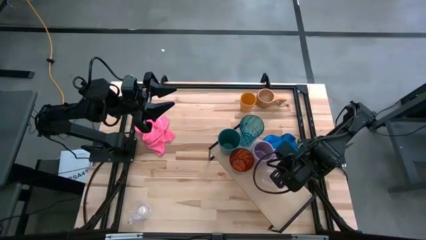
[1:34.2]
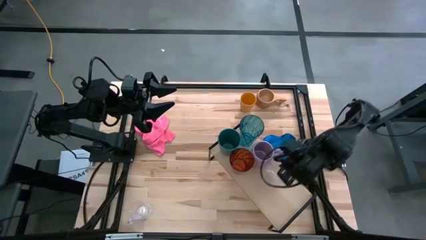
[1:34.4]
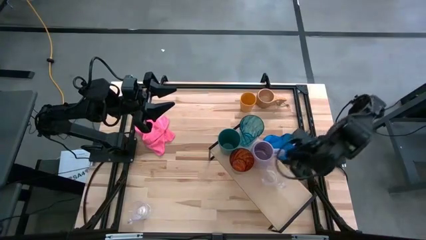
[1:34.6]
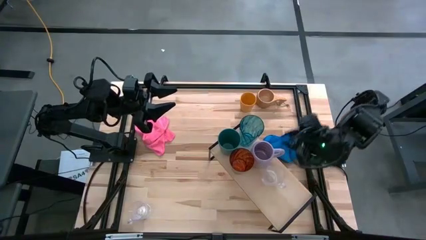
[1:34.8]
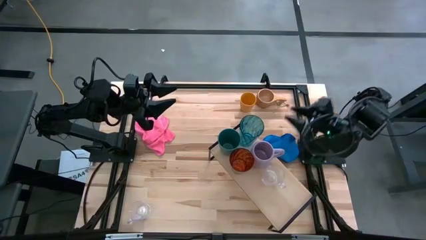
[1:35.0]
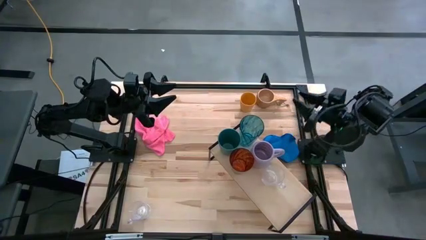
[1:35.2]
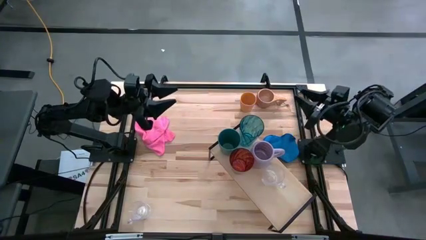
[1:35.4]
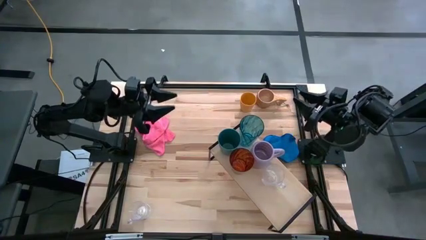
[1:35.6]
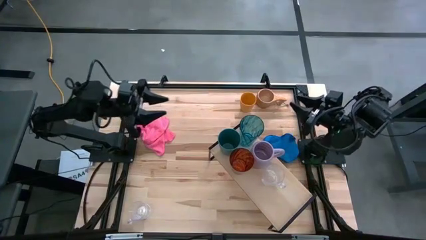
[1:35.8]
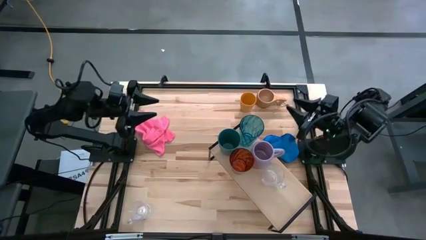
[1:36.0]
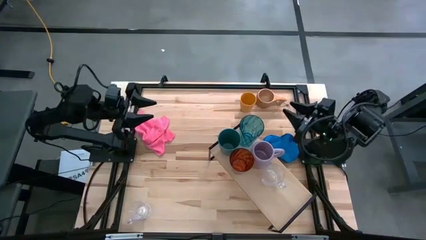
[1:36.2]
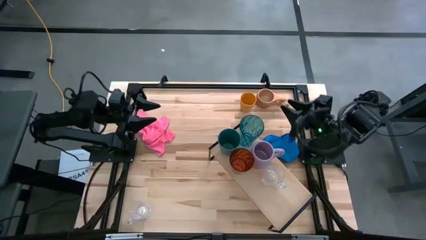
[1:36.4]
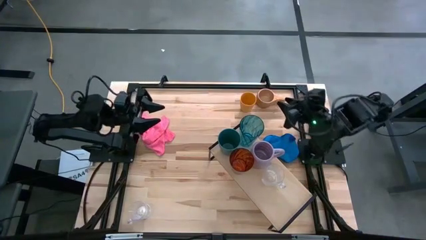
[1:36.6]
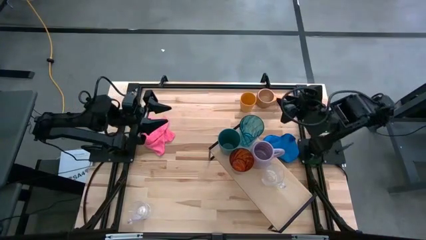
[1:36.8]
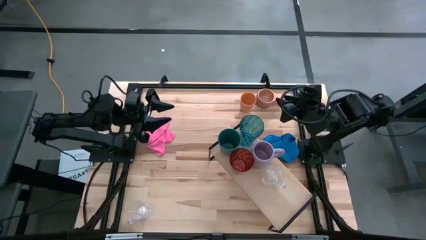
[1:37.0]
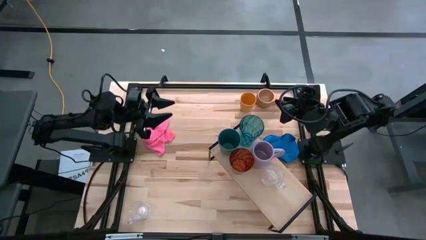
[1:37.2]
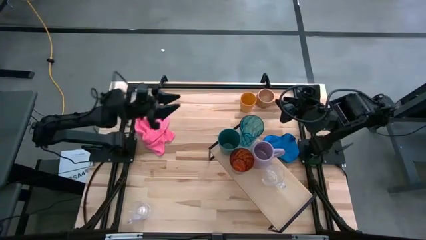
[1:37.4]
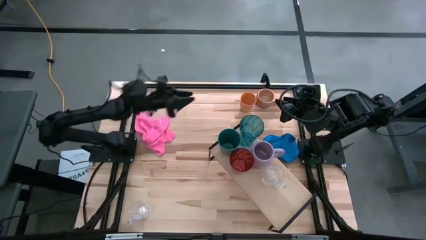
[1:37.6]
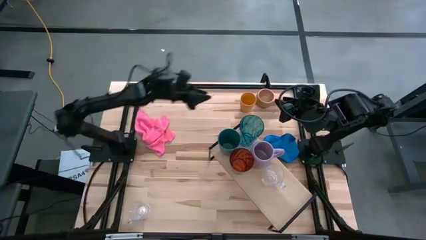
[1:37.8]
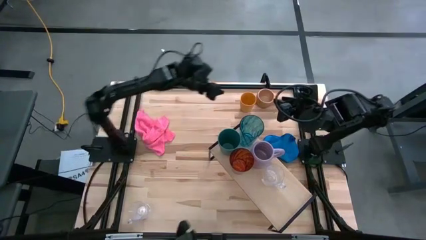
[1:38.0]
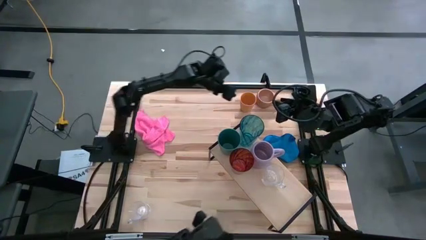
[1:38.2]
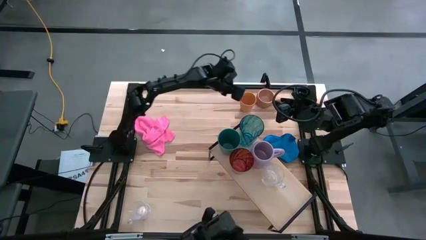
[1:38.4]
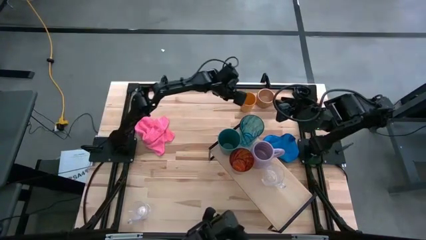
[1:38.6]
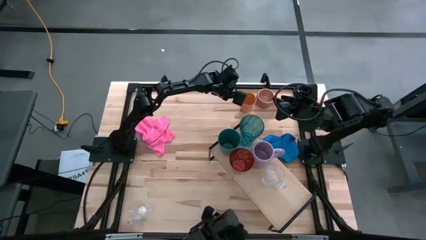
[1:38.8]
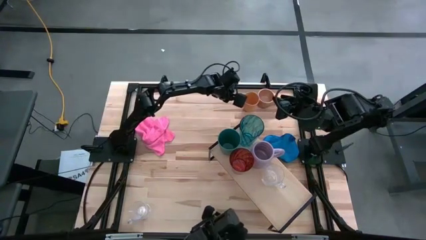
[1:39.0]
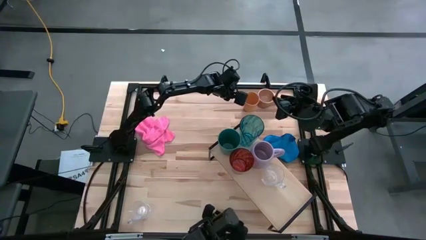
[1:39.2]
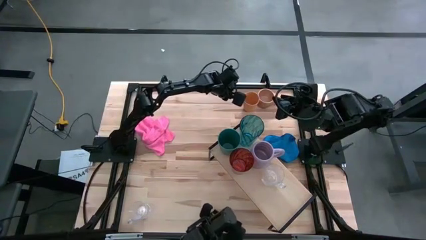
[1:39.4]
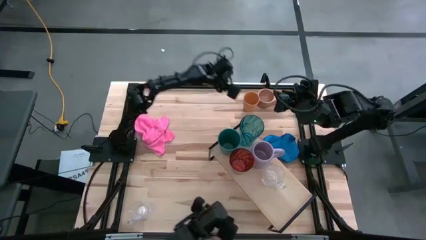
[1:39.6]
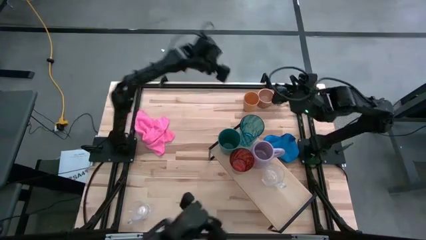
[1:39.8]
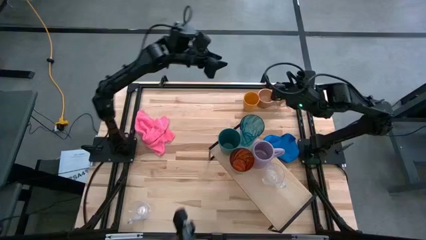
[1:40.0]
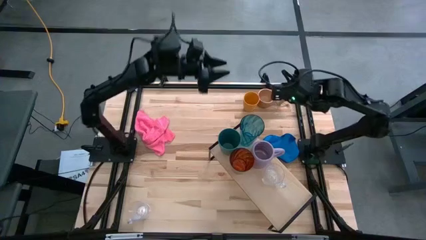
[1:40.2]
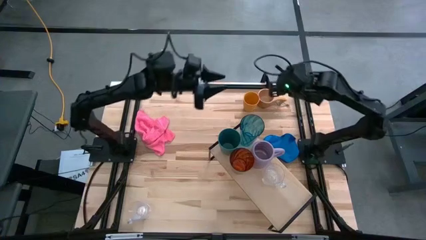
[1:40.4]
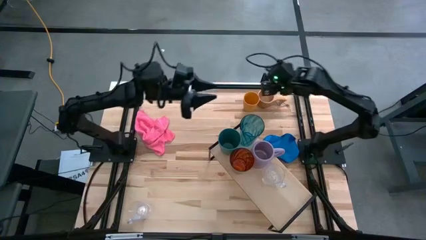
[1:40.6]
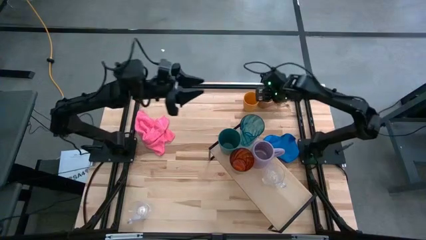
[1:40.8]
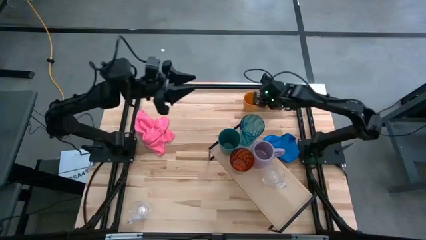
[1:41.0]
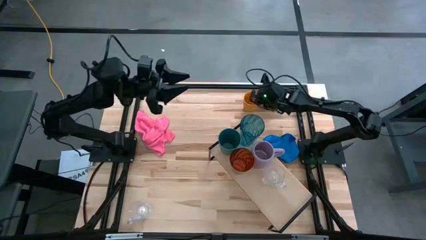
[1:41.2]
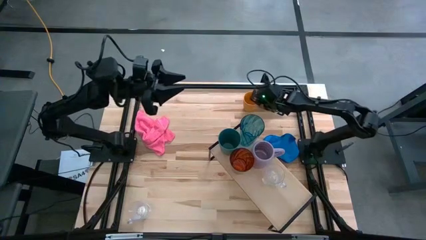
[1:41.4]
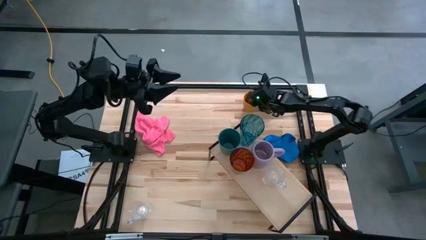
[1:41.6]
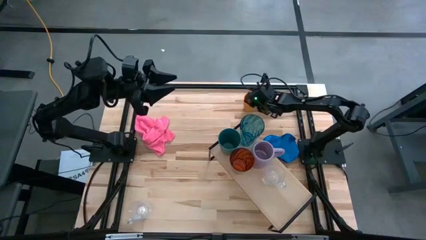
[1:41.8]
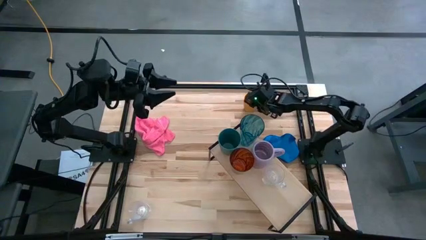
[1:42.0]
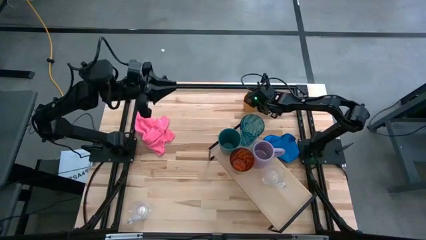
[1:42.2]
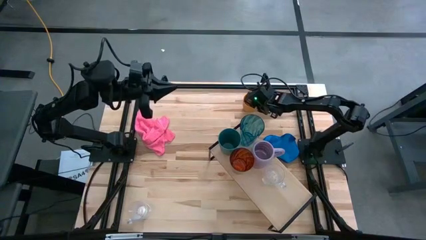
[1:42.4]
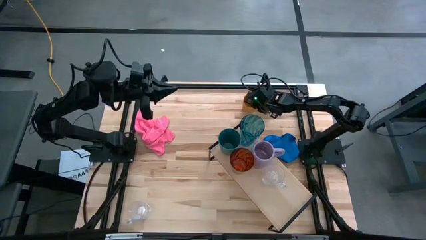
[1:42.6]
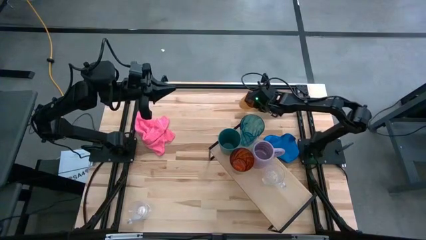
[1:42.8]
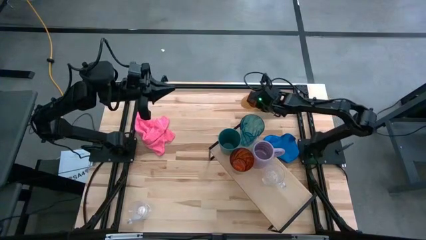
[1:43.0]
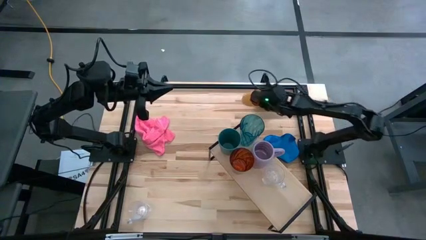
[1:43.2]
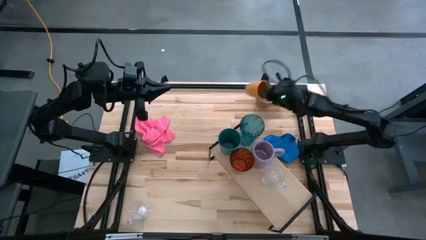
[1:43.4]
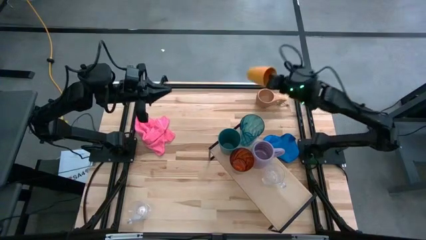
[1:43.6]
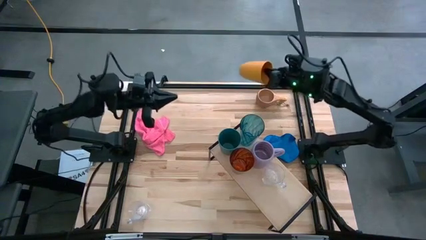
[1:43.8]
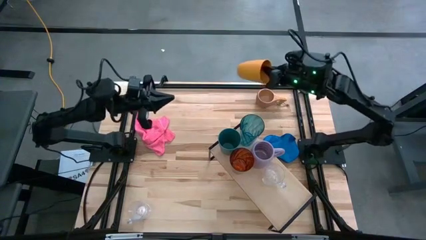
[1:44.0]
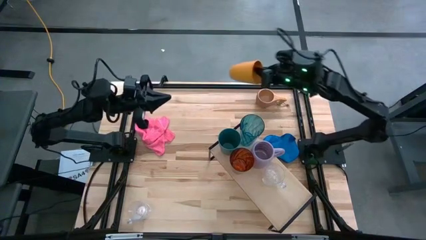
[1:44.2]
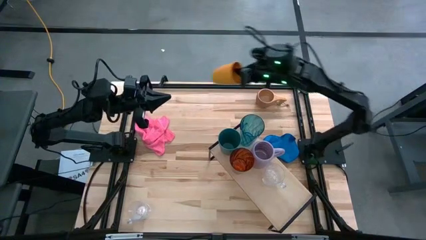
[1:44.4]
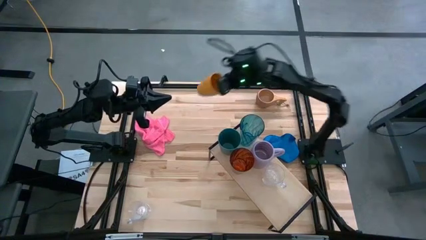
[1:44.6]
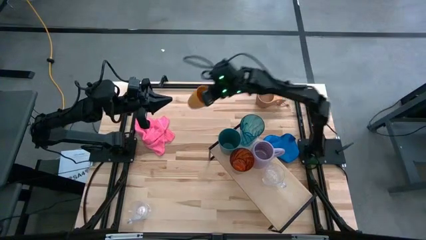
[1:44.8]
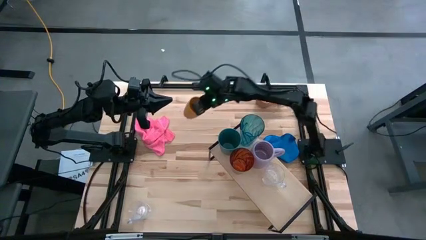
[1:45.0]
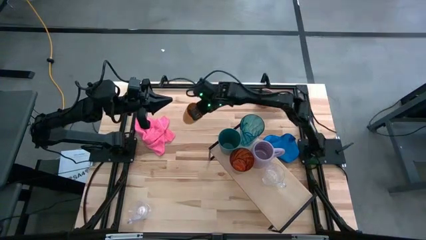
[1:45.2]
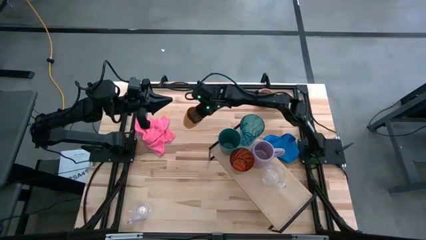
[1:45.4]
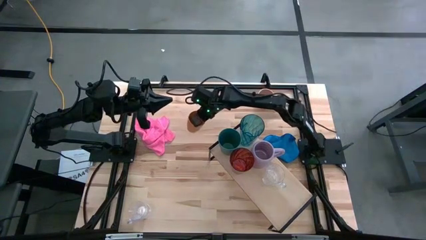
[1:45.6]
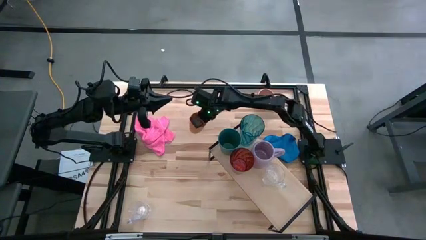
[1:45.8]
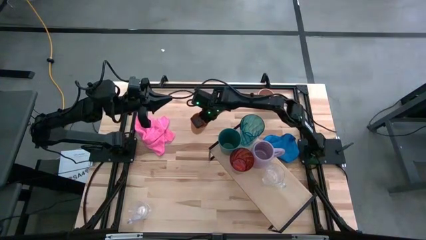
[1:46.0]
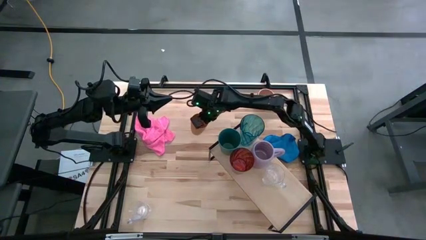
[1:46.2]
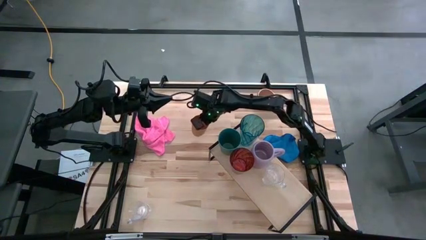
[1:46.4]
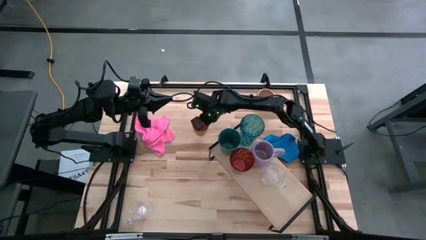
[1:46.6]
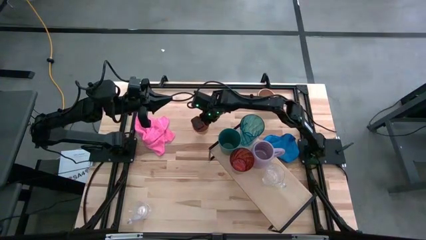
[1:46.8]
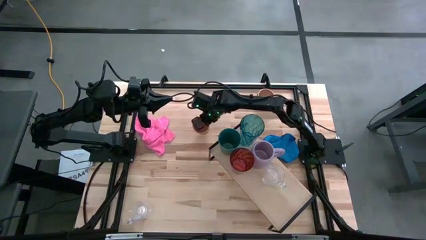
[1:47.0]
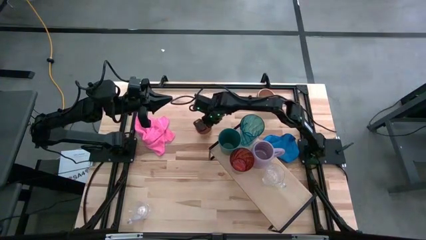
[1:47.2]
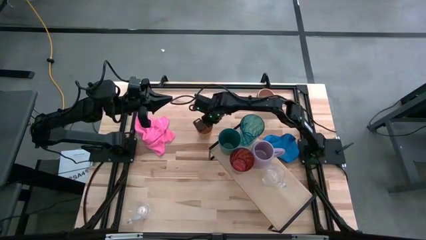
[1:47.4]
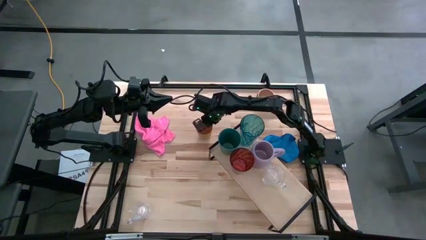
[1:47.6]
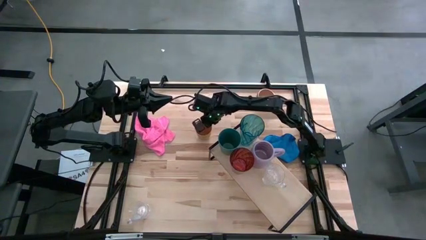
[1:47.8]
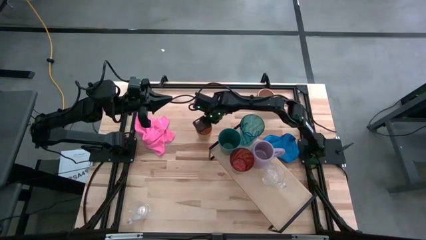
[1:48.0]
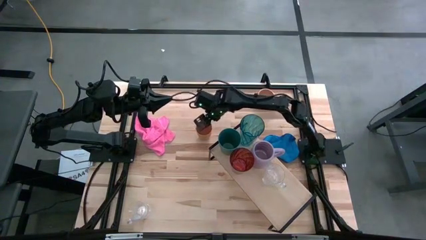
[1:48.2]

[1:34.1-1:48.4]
Task: Stack small to large cups/mugs on shelf
Put the orange cup on the shelf
